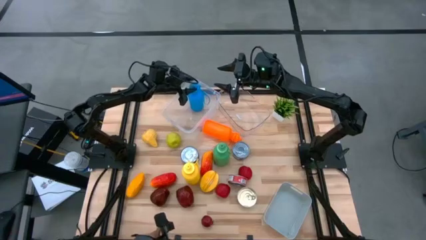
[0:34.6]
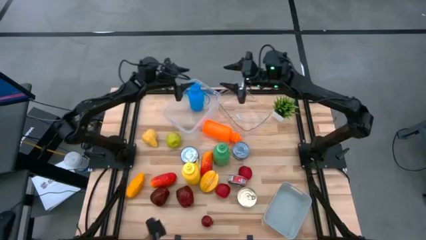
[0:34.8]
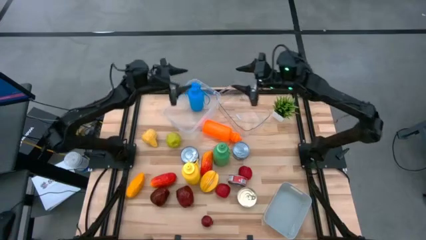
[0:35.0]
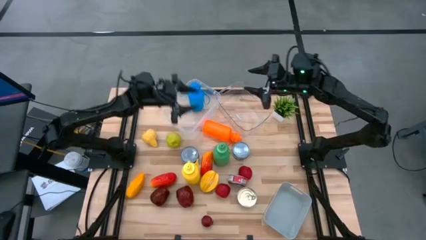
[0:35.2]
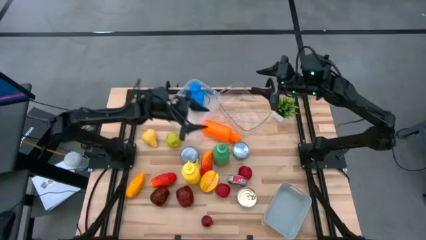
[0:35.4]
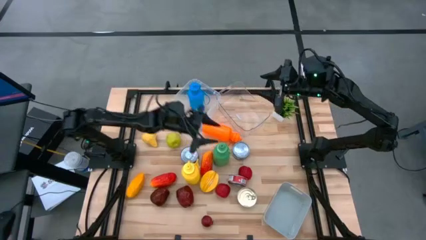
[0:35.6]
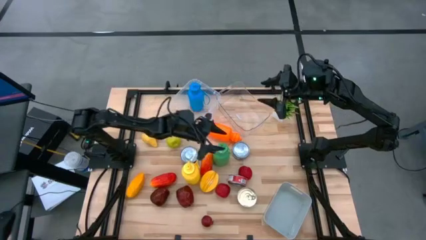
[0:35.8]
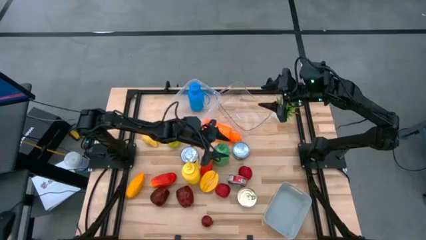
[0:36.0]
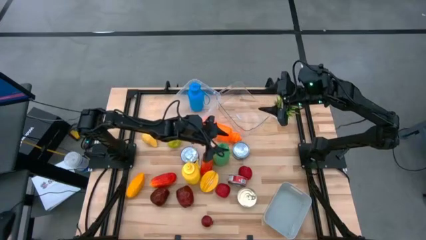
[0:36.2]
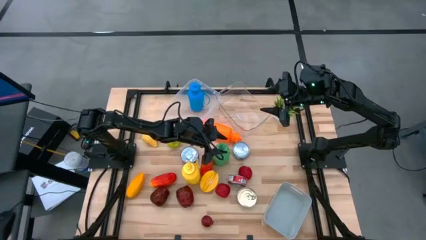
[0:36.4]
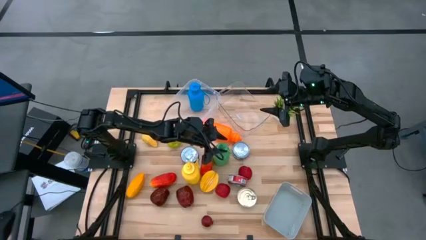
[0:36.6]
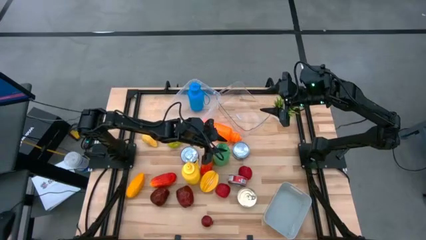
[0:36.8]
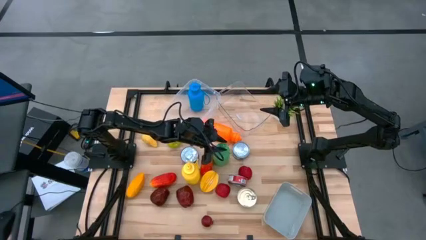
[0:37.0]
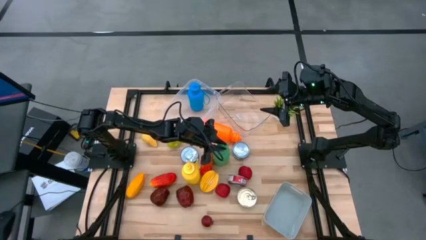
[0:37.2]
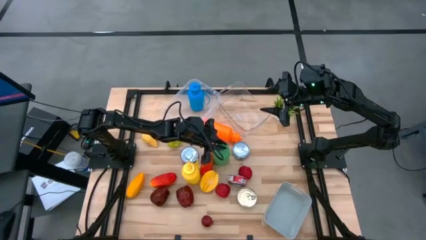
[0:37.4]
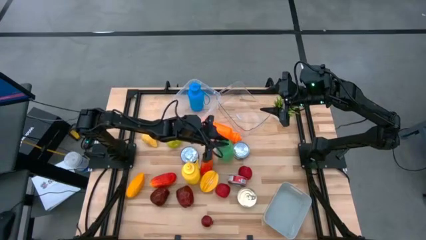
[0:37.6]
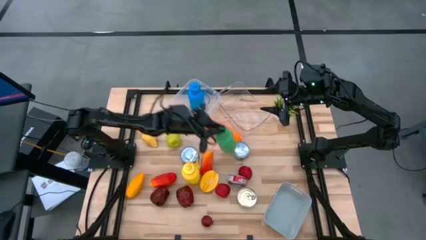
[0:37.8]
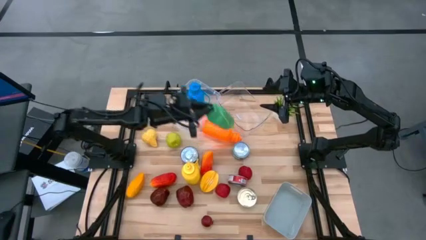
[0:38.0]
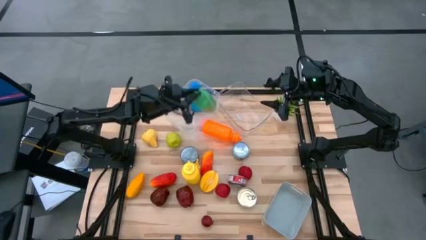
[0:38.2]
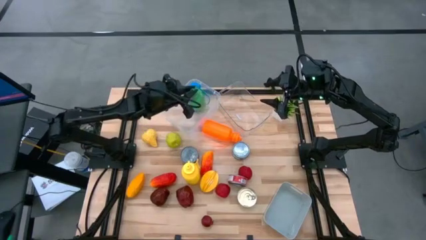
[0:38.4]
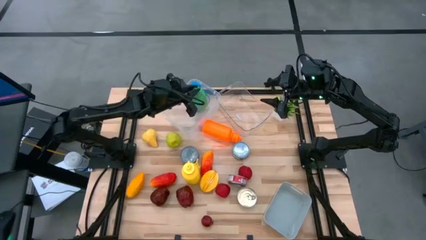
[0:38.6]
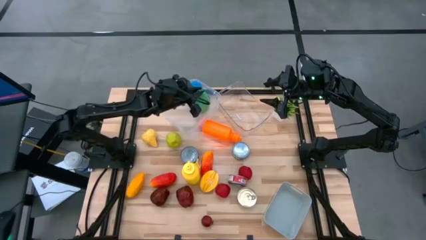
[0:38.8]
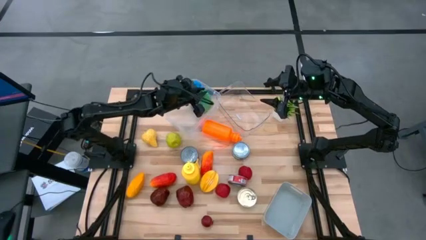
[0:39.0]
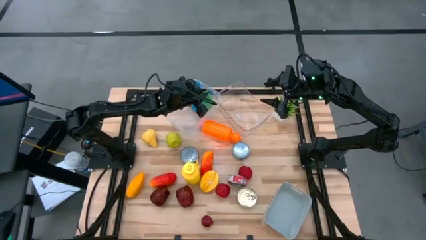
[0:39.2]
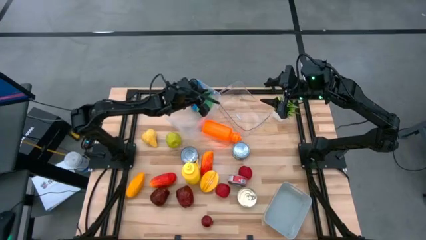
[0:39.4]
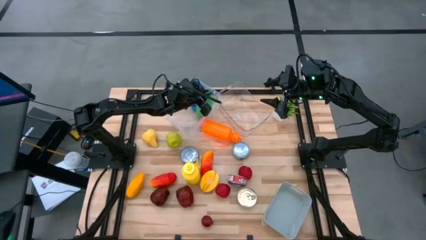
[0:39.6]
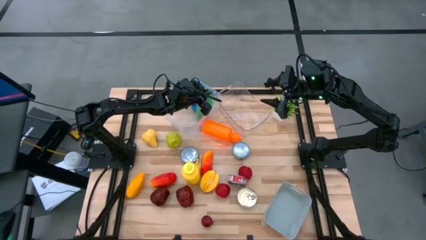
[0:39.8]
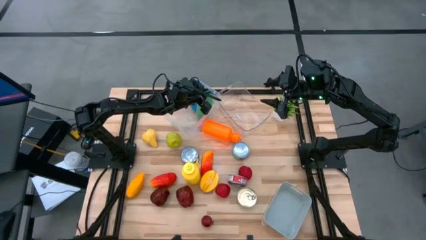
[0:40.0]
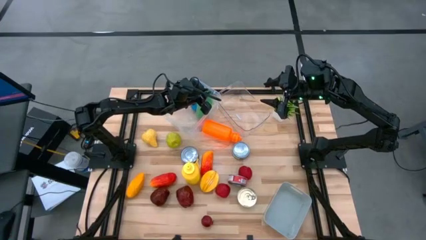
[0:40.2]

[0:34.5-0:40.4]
Task: Pick & Place Food Item
Put the green water bottle into the left transparent bin

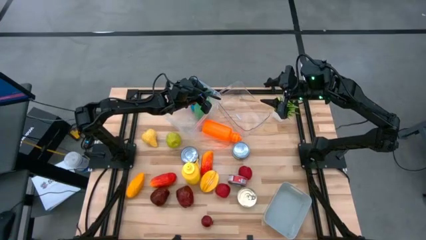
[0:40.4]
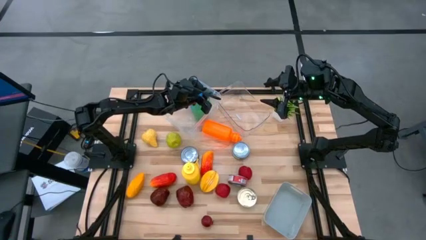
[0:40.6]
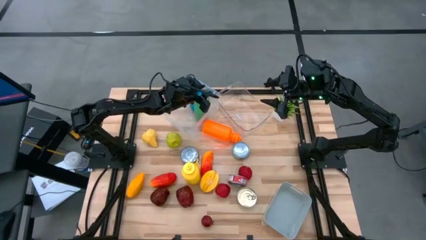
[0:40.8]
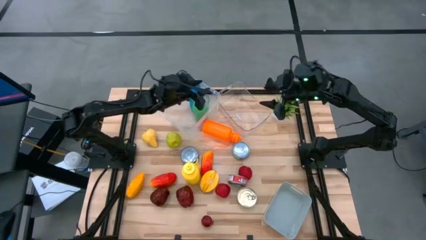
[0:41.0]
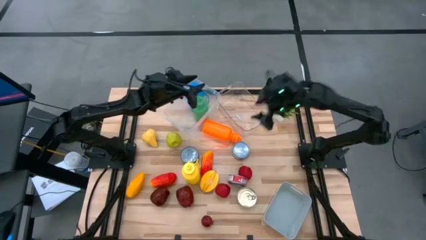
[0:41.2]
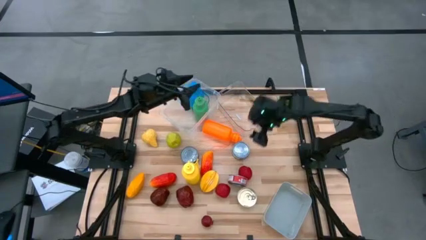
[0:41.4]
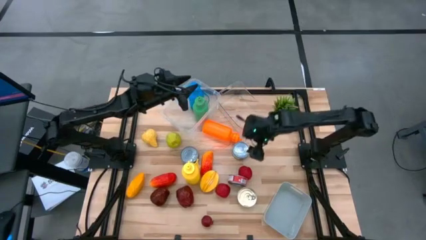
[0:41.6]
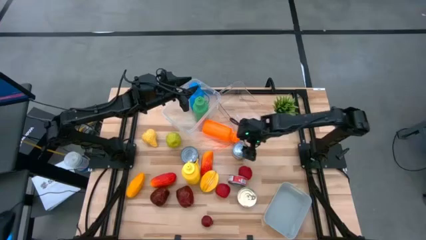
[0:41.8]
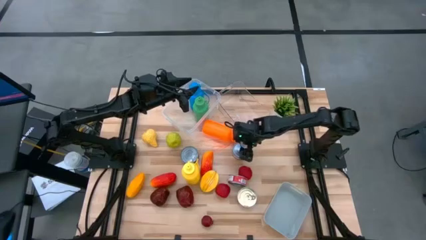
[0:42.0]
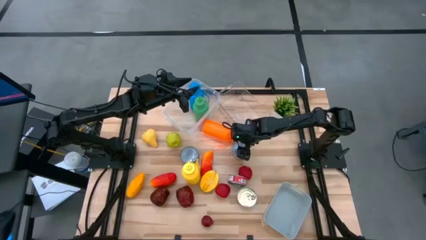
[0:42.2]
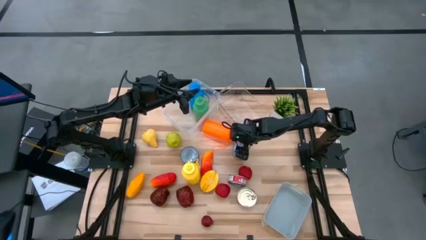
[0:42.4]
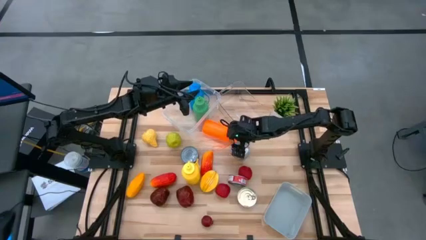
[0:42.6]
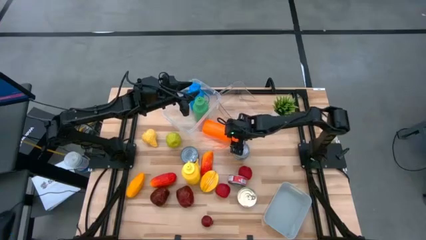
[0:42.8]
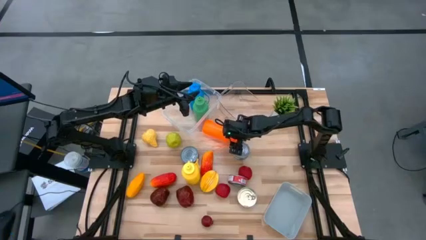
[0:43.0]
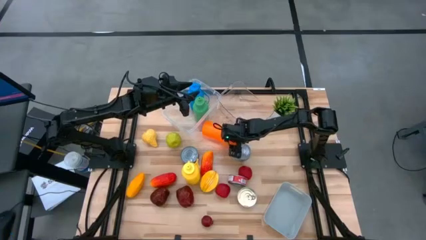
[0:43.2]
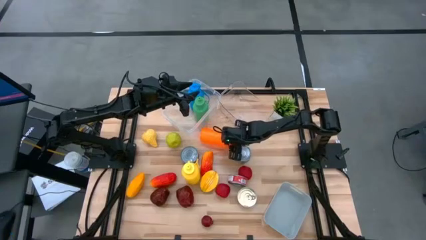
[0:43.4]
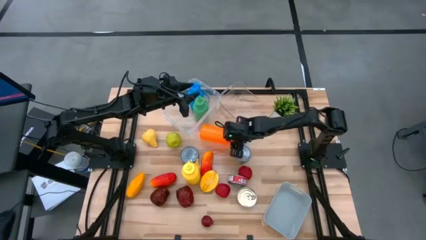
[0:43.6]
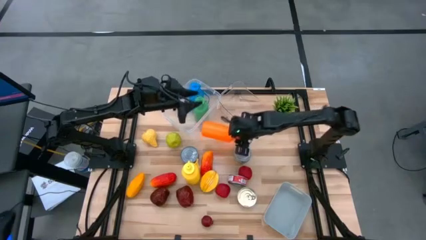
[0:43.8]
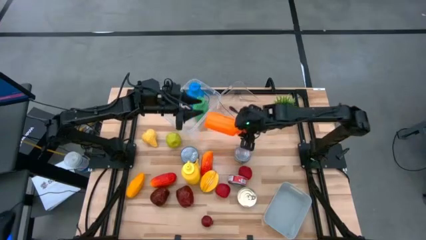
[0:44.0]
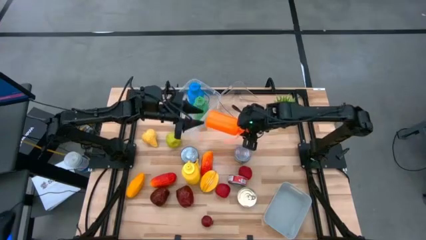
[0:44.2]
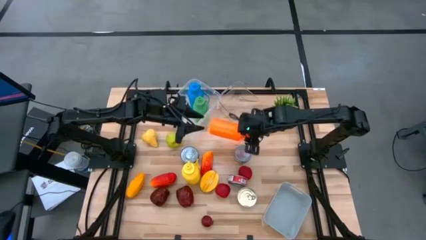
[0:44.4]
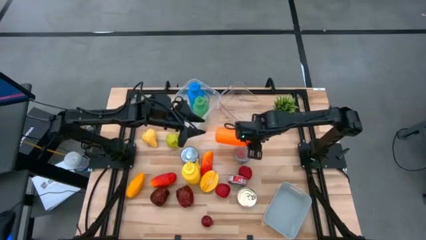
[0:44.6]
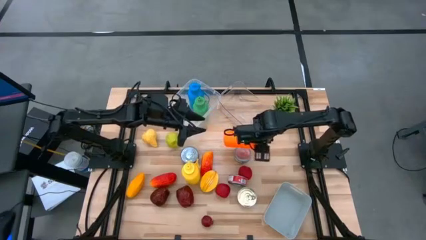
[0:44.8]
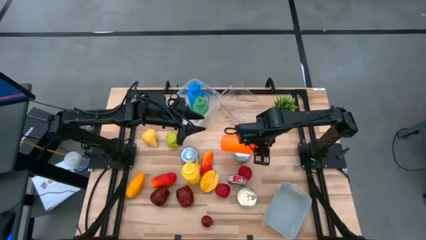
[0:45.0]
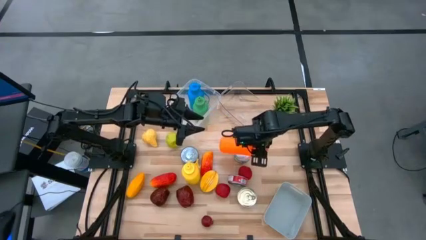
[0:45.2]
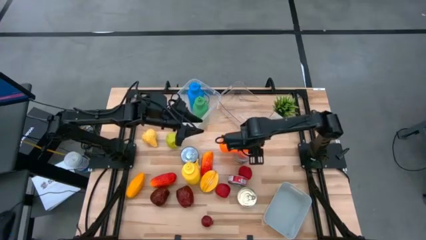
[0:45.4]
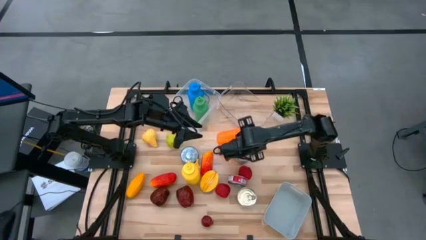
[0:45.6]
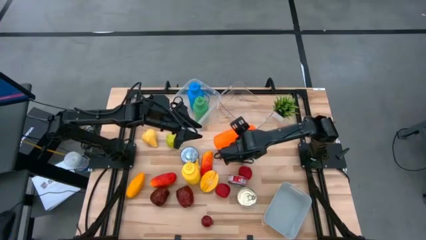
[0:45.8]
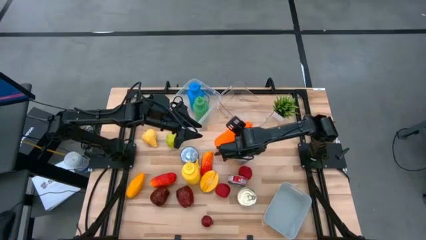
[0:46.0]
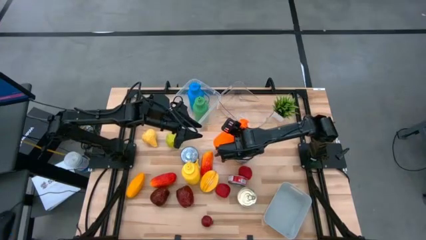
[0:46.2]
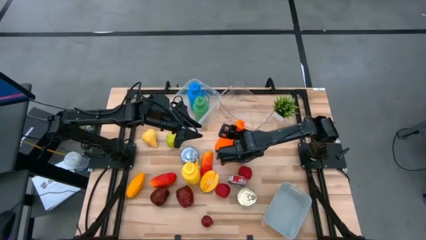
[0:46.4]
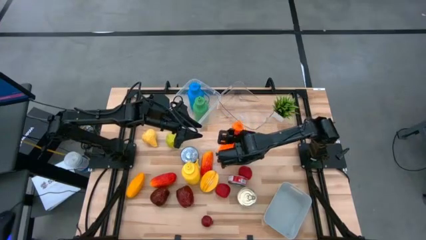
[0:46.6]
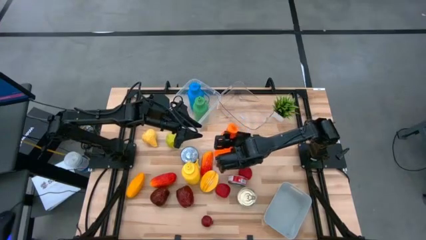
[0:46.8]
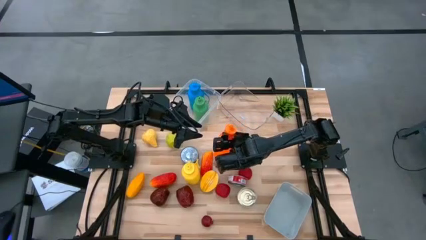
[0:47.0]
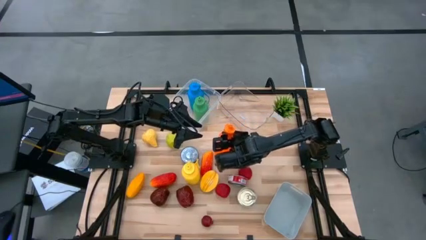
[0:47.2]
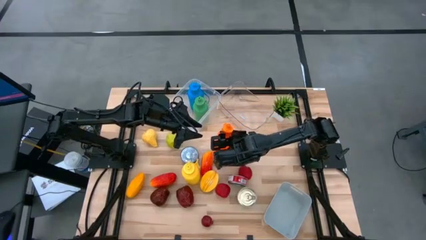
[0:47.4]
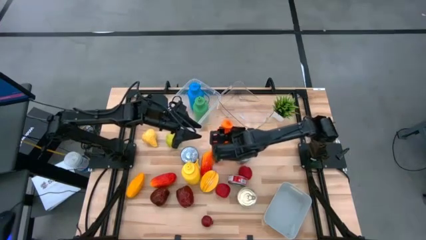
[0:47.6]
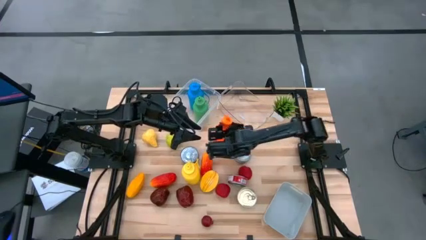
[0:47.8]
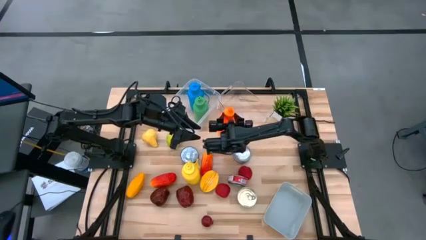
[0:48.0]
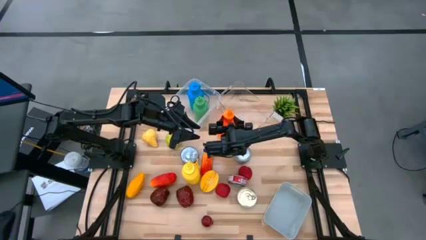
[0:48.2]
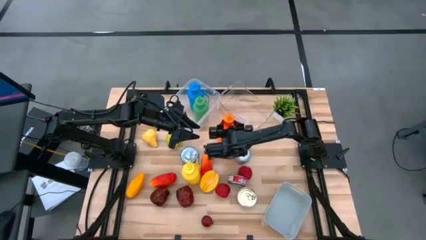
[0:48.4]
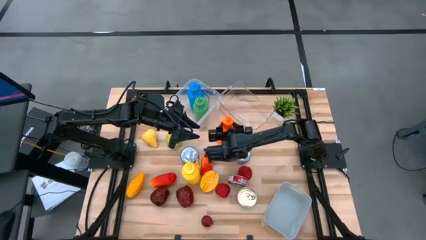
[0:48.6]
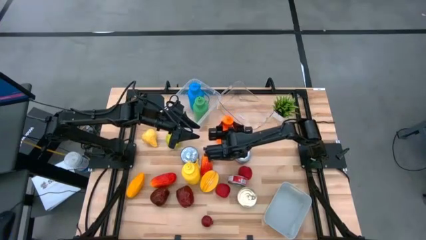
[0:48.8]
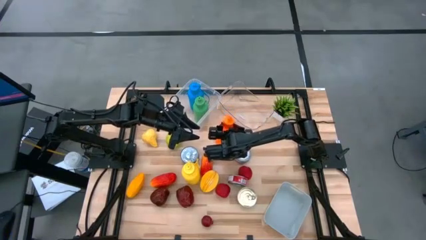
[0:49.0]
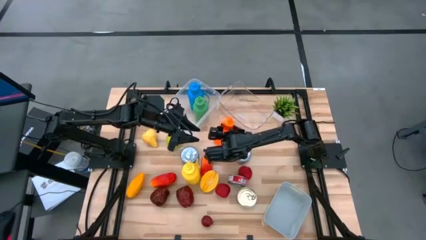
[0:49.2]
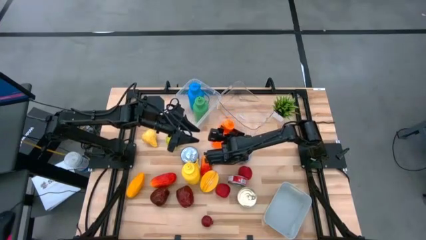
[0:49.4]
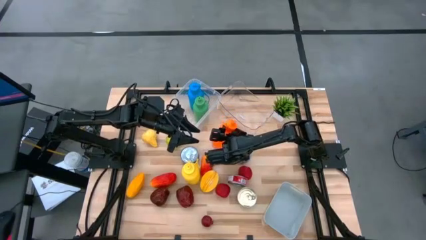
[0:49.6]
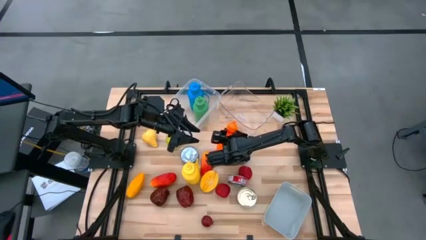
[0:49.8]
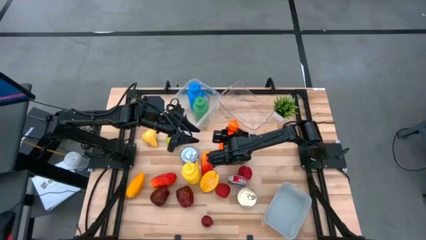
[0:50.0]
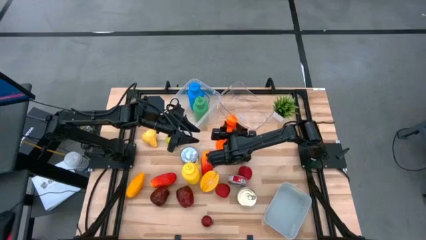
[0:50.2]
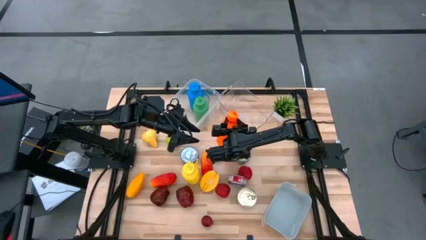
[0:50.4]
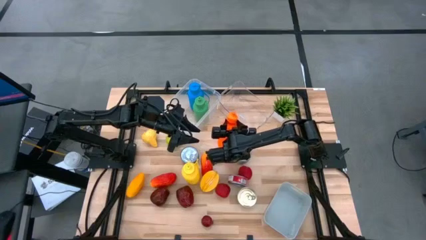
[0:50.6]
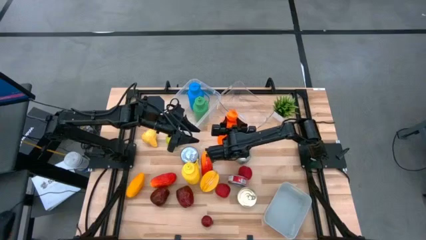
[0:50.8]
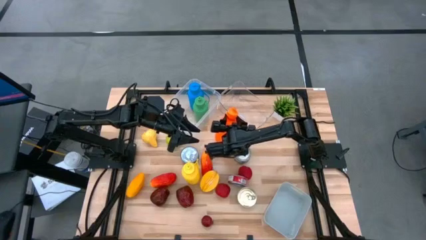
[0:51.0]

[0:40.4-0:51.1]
Put the orange water bottle into the left transparent bin
